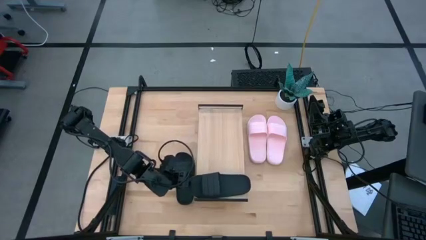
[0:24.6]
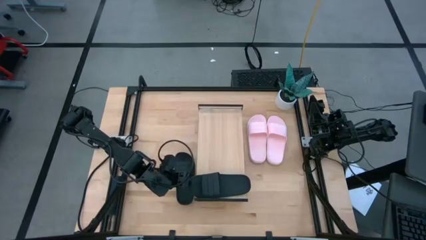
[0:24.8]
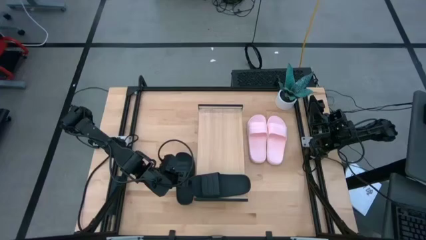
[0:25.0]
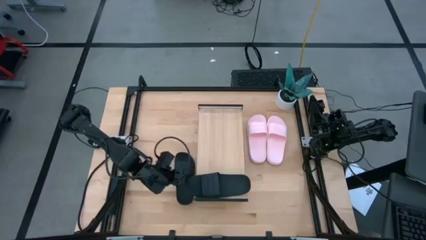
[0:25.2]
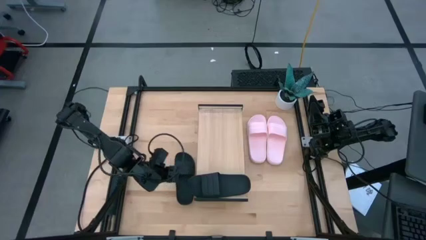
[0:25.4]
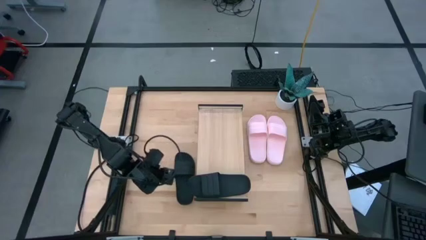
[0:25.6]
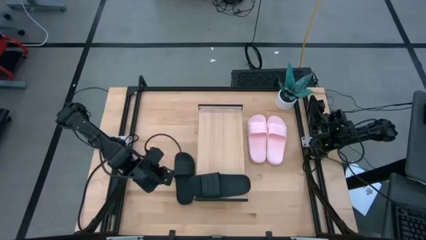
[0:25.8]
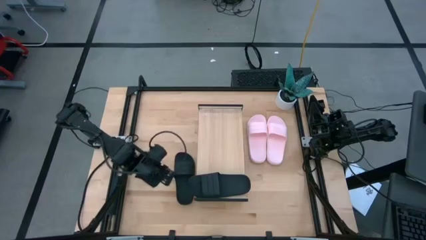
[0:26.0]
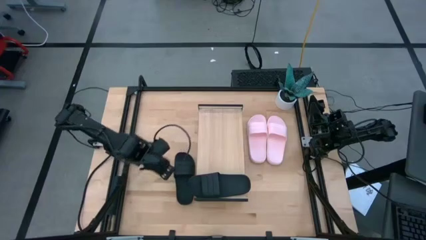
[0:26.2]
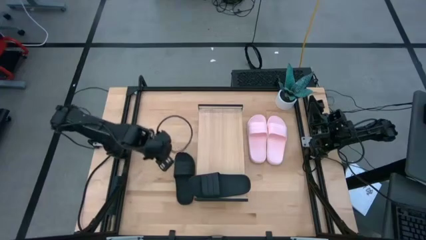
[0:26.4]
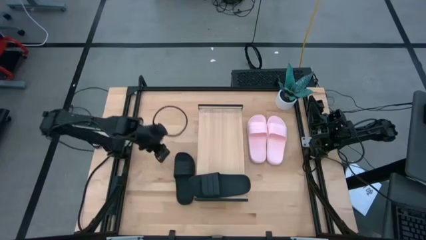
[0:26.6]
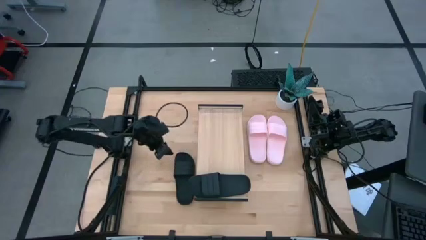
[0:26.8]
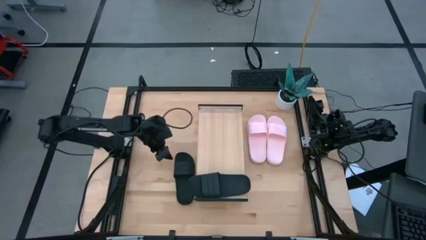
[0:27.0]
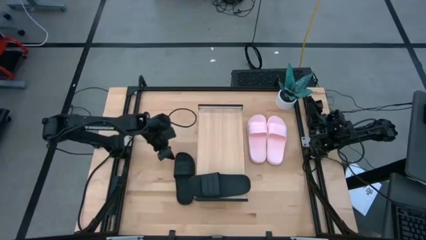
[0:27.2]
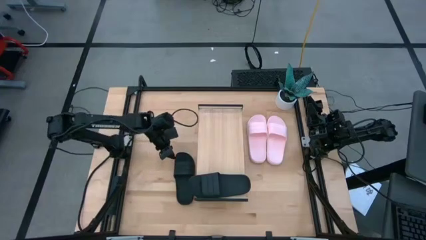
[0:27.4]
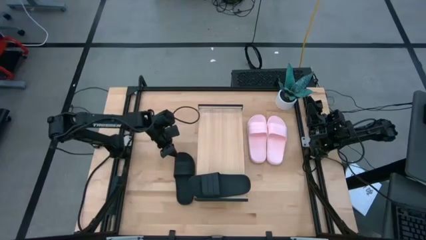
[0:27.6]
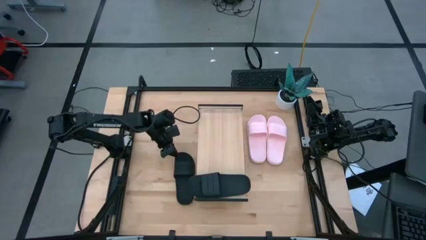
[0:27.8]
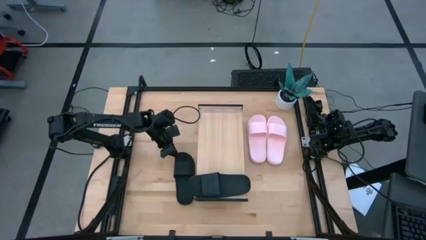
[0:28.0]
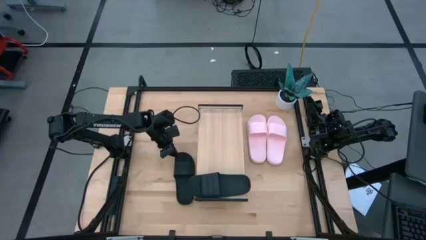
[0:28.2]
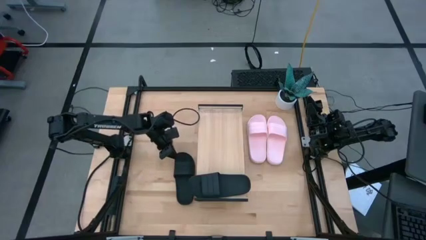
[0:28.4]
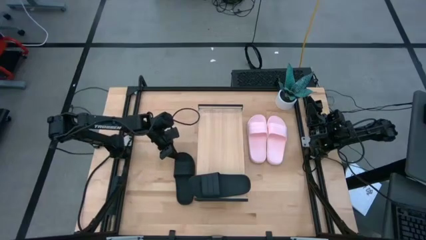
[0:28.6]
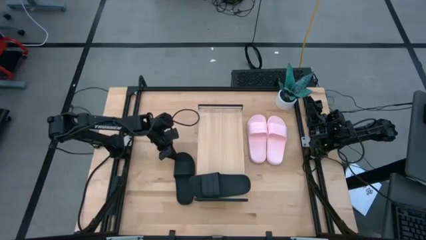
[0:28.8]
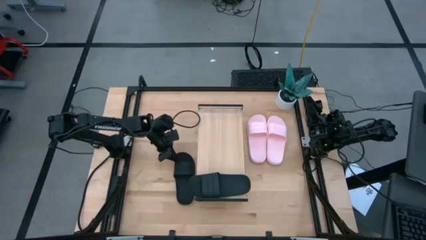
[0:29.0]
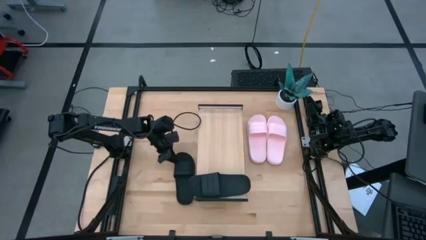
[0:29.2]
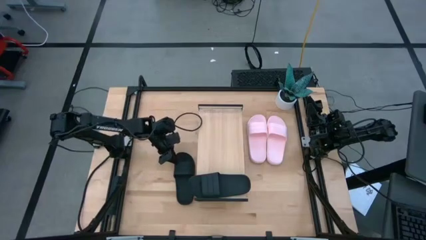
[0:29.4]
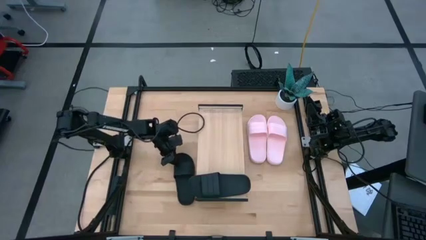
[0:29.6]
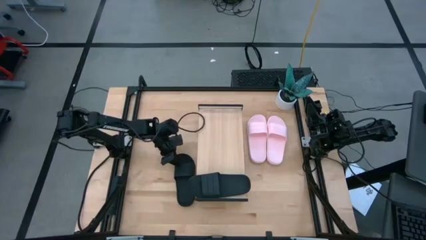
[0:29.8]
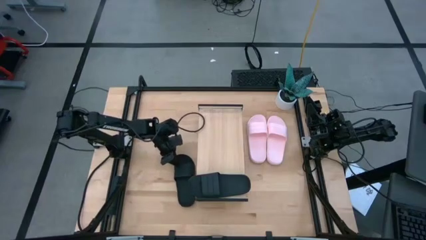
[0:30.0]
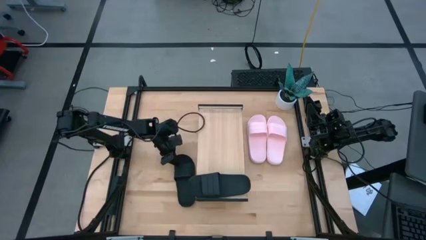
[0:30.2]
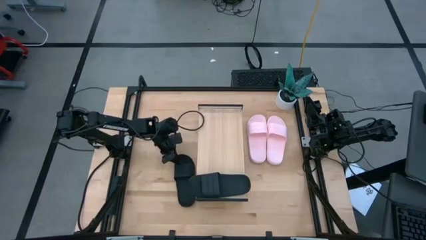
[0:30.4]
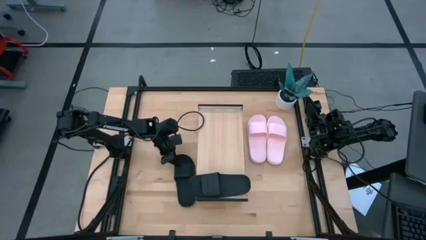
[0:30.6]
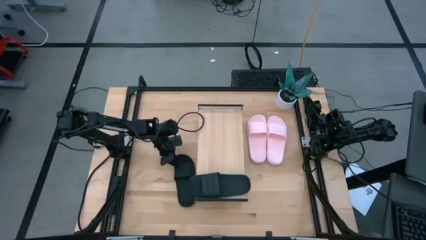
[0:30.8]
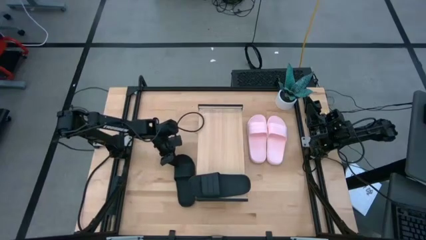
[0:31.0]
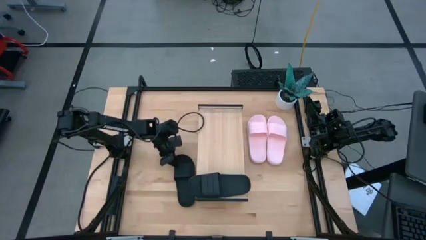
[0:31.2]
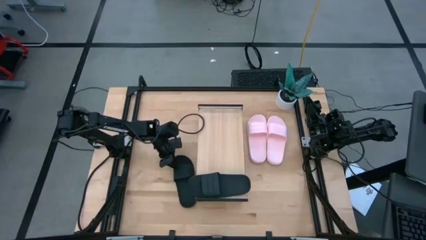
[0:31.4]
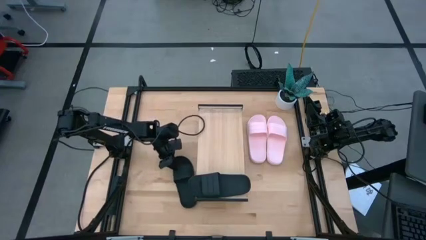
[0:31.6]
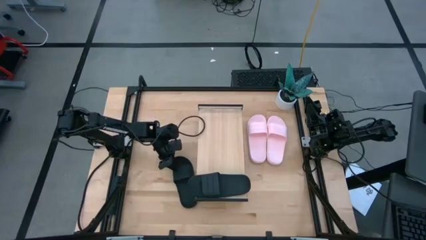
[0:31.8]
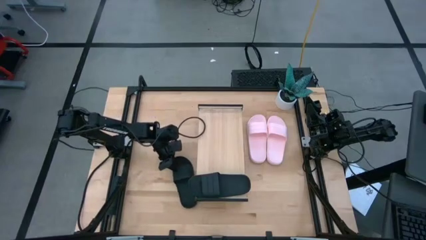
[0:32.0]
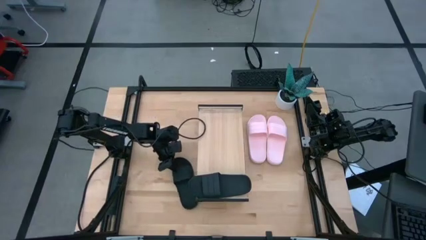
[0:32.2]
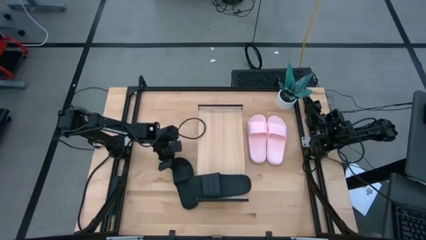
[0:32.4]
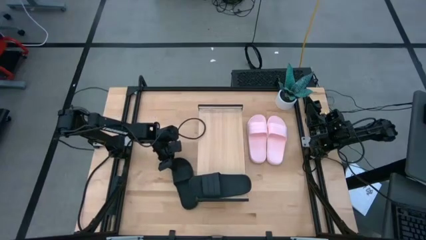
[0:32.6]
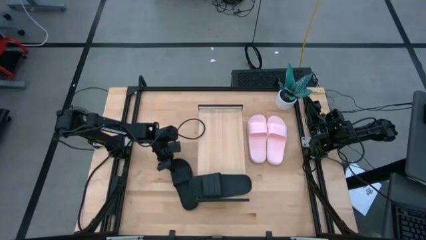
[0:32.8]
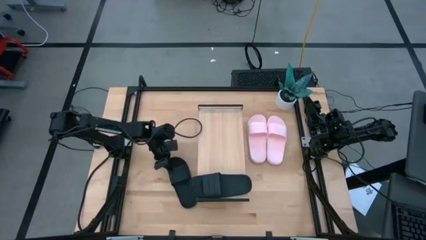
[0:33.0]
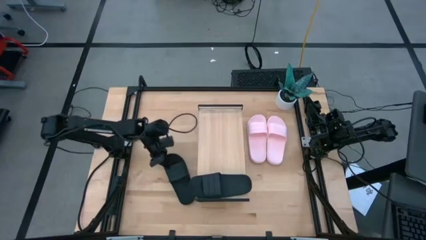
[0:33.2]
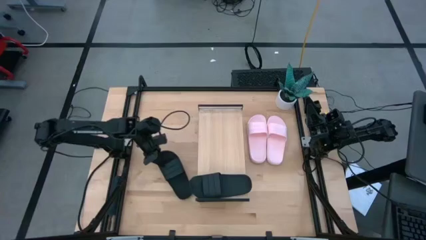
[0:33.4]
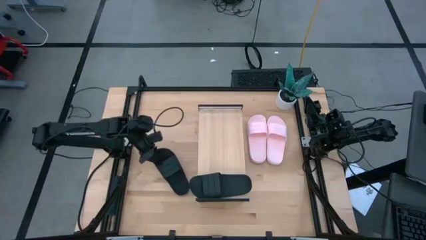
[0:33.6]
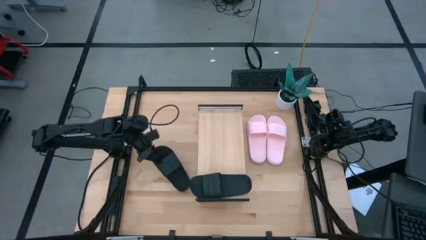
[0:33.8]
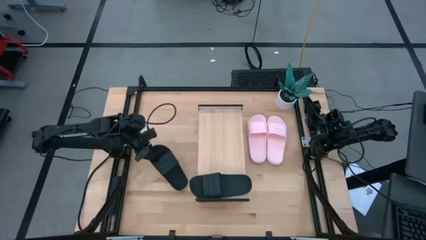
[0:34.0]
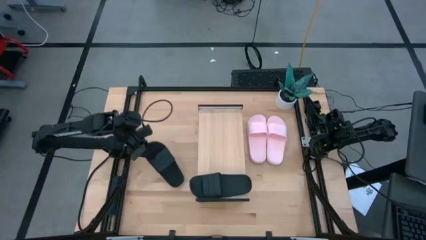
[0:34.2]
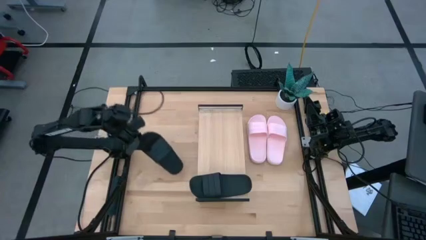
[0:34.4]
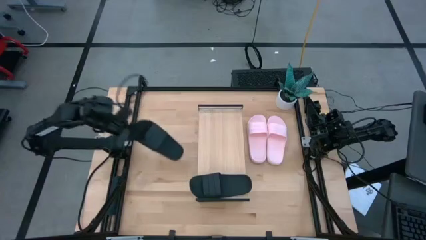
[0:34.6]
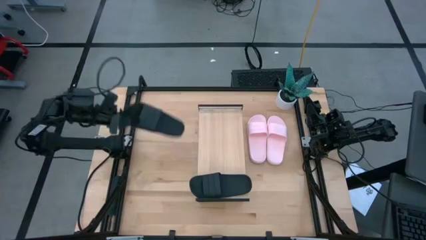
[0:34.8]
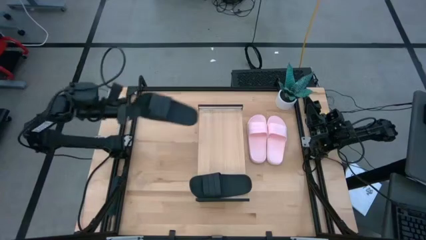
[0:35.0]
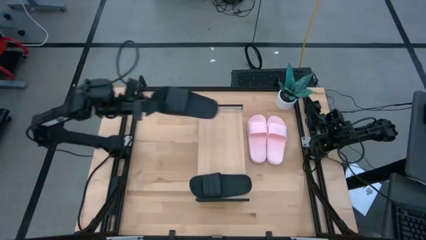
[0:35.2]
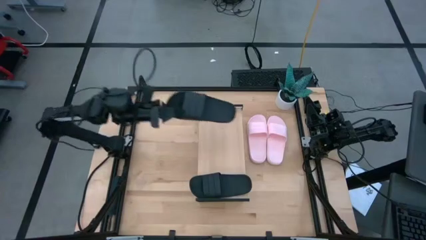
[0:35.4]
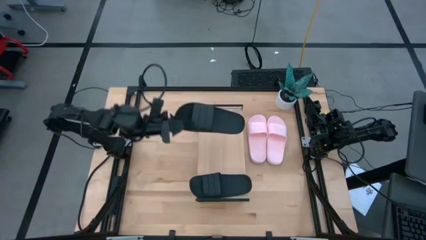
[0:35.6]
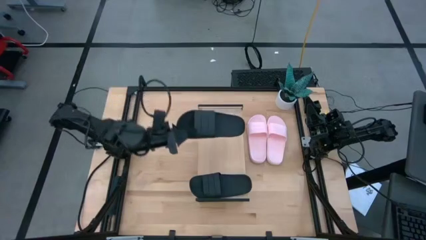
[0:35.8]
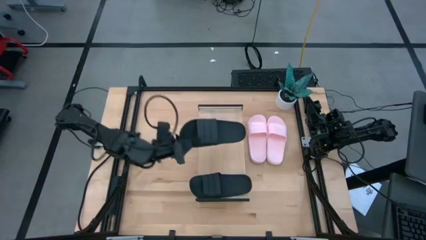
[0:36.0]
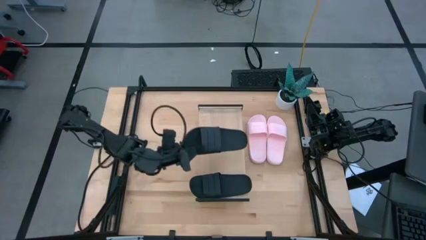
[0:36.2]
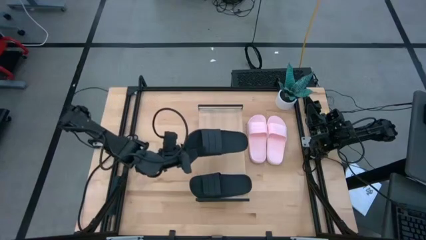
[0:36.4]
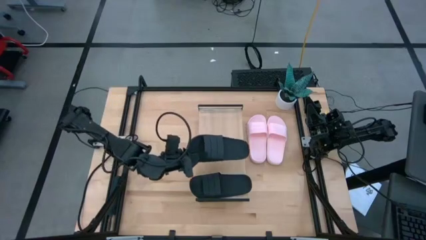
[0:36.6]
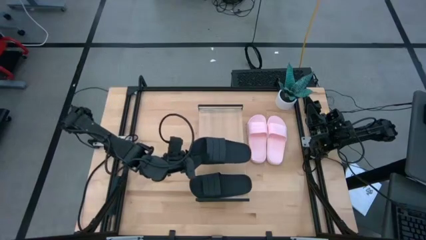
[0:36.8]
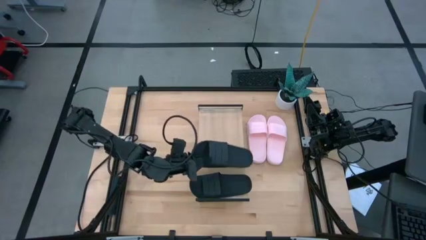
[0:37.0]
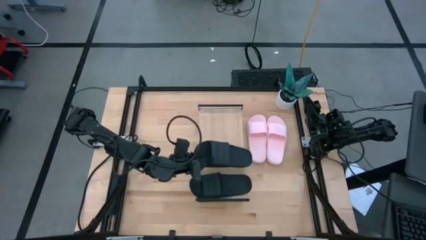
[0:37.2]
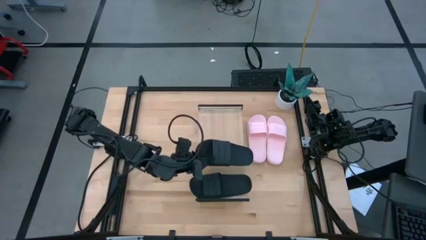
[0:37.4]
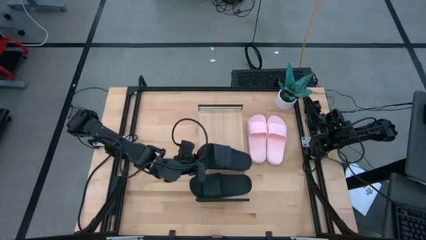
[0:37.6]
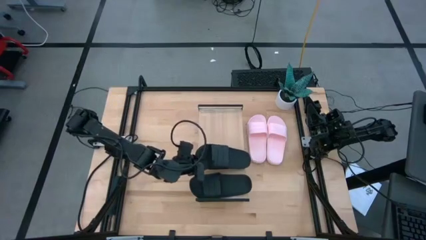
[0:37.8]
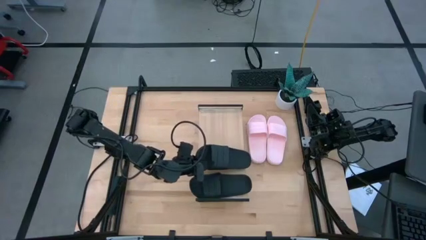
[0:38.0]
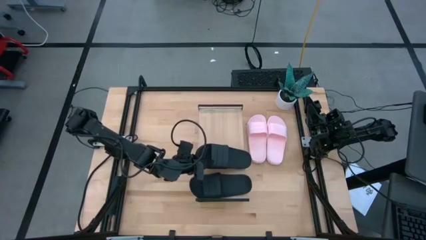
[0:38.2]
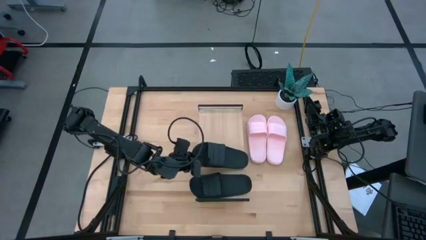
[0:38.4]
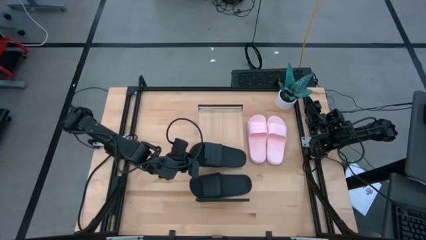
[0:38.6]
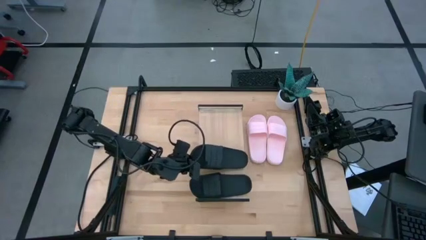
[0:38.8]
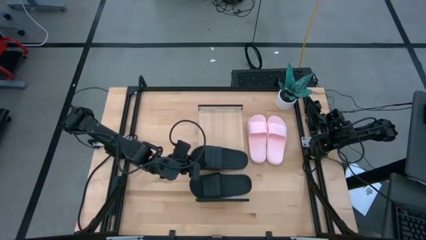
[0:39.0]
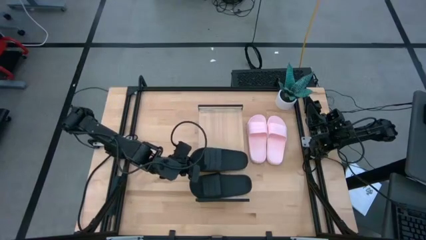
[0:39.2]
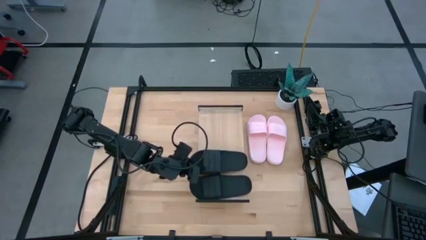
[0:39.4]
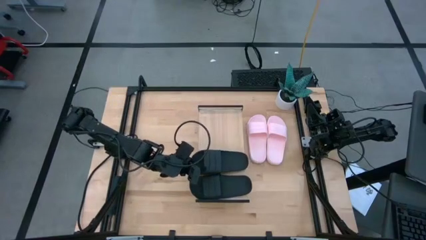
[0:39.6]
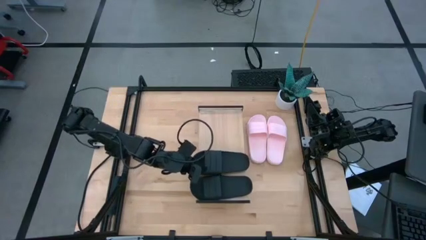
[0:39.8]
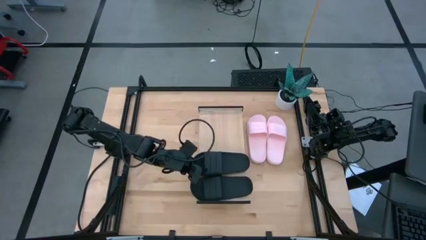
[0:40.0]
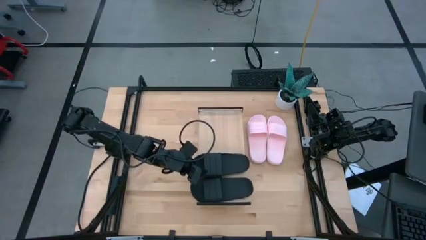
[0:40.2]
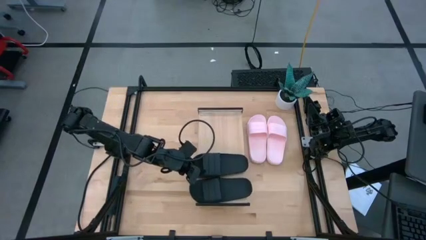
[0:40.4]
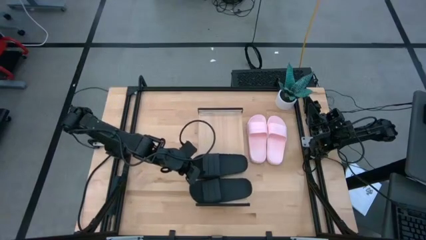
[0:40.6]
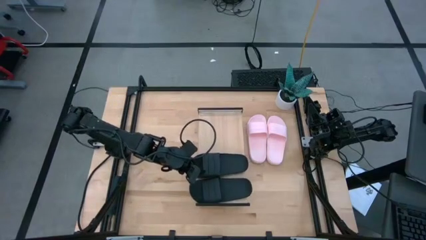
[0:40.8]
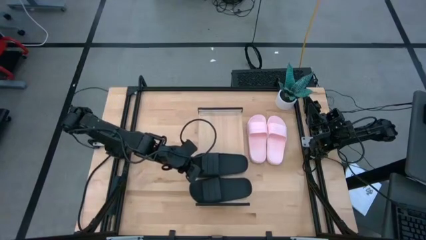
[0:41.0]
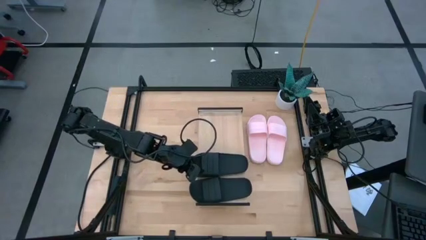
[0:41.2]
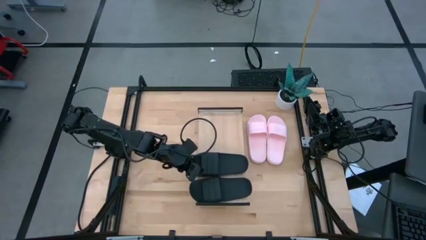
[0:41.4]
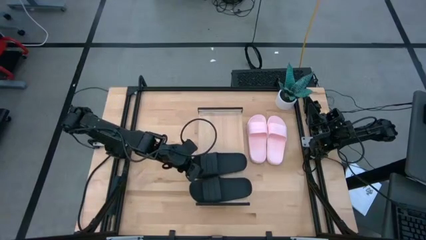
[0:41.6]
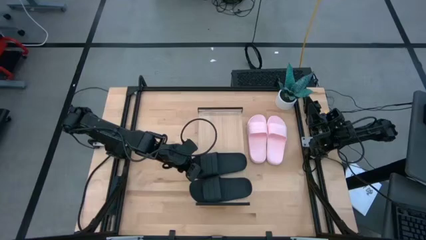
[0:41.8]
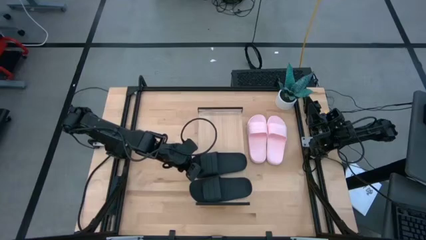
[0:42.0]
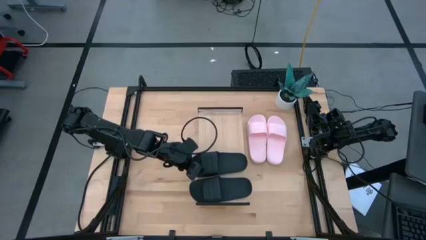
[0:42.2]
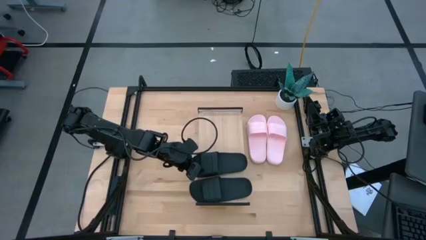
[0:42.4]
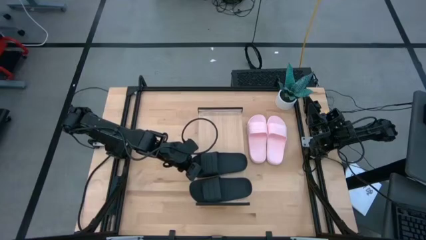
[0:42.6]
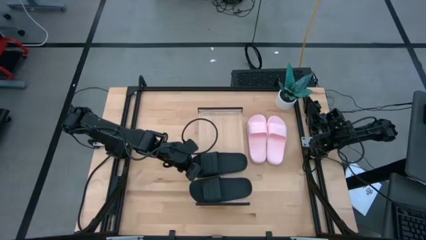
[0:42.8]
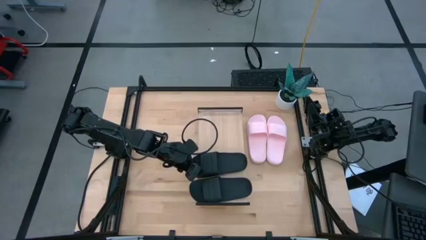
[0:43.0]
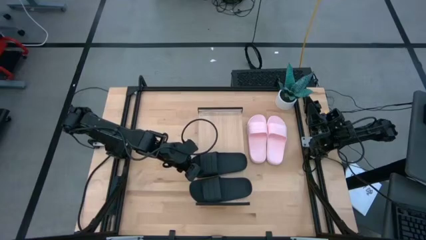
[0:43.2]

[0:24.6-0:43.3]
Task: Pick and place slides into the shelf
Put the black slides on the shelf
